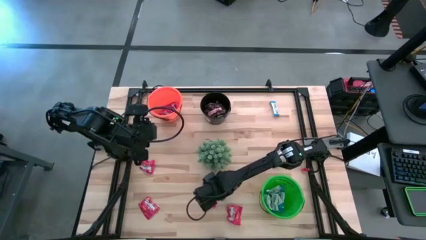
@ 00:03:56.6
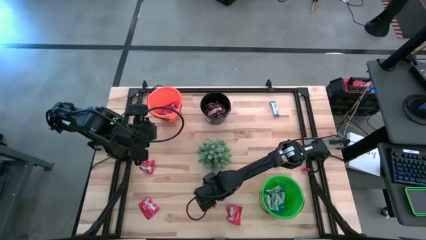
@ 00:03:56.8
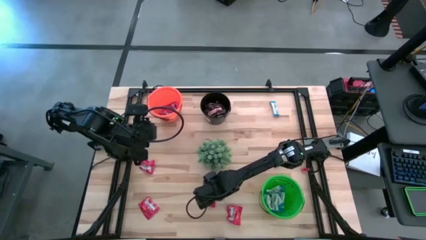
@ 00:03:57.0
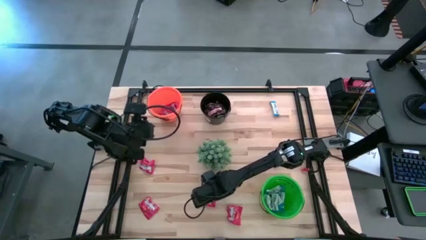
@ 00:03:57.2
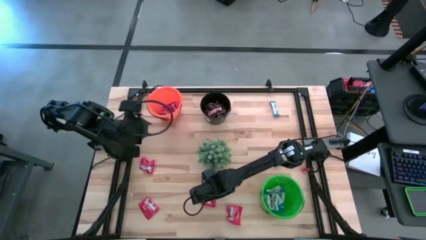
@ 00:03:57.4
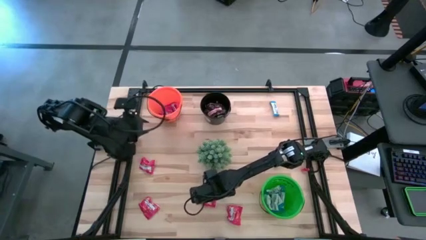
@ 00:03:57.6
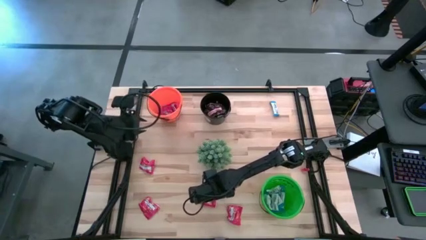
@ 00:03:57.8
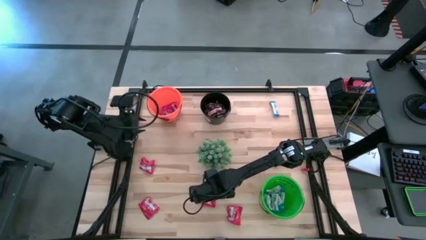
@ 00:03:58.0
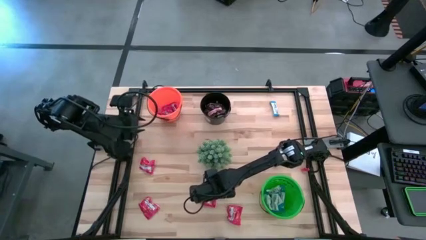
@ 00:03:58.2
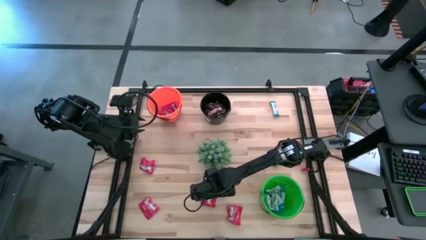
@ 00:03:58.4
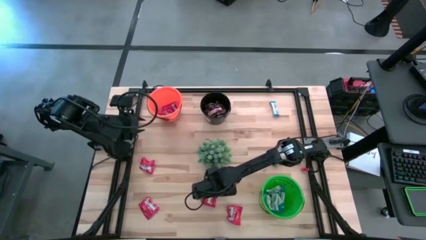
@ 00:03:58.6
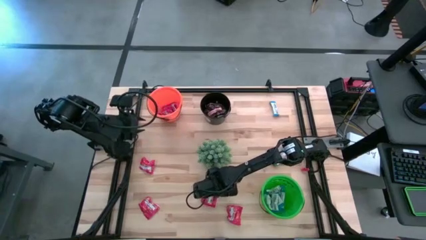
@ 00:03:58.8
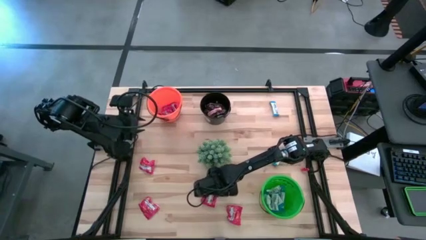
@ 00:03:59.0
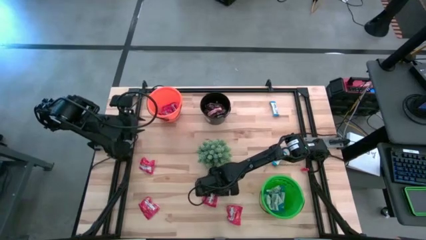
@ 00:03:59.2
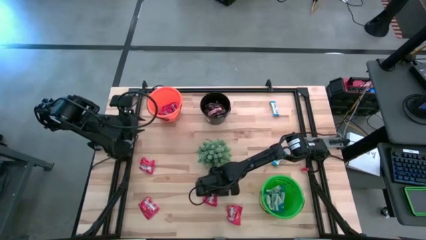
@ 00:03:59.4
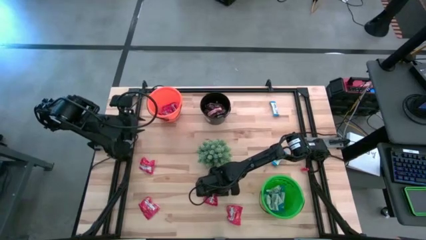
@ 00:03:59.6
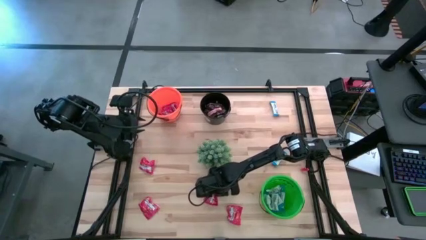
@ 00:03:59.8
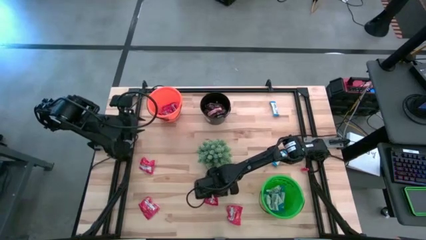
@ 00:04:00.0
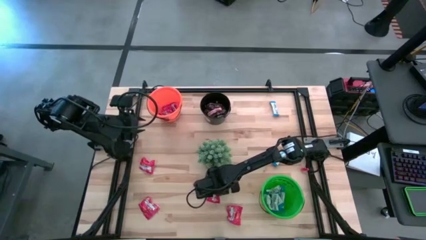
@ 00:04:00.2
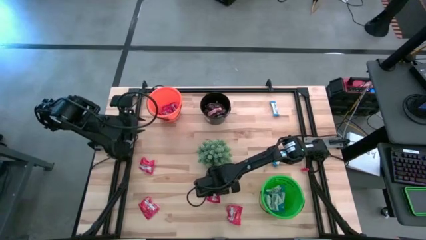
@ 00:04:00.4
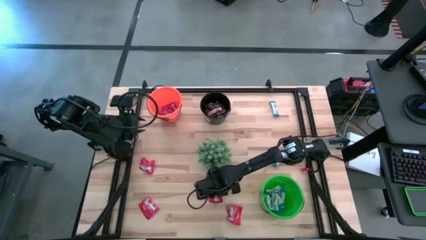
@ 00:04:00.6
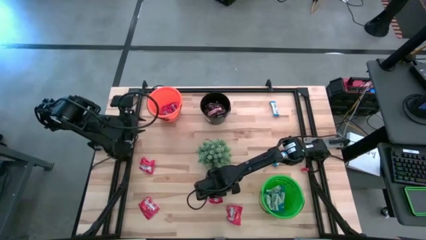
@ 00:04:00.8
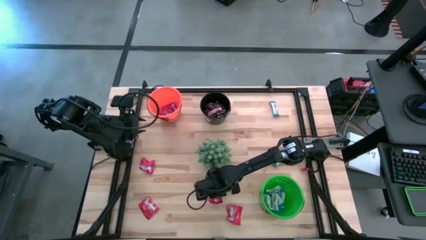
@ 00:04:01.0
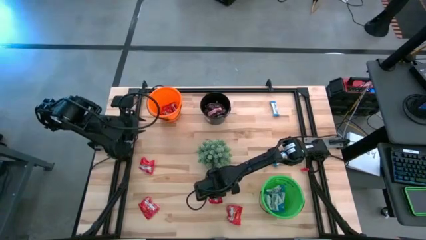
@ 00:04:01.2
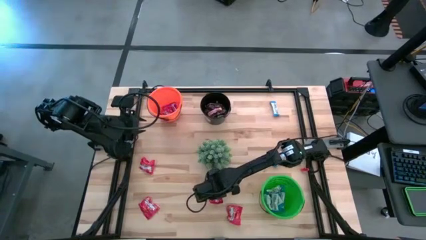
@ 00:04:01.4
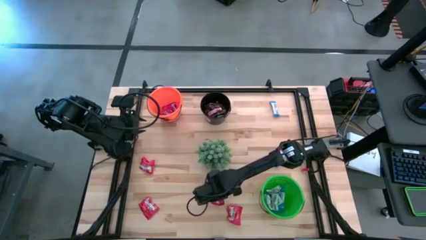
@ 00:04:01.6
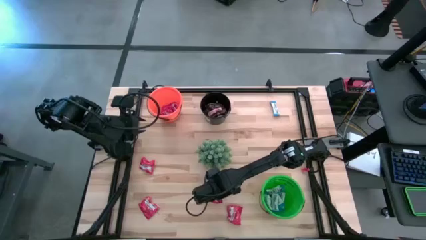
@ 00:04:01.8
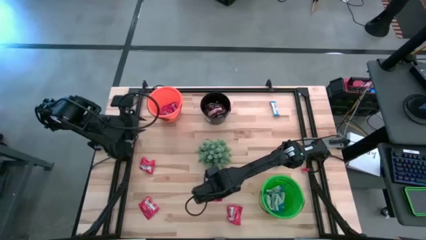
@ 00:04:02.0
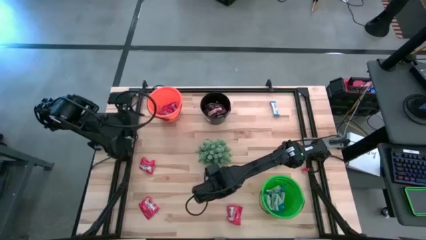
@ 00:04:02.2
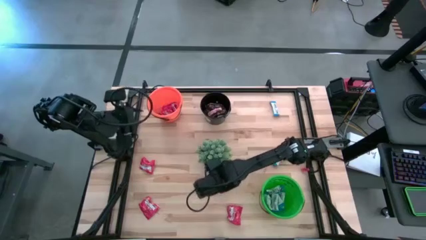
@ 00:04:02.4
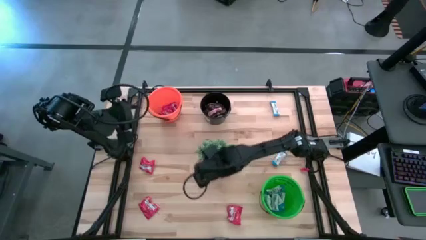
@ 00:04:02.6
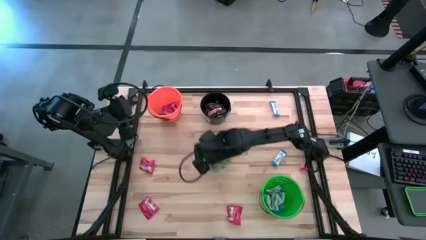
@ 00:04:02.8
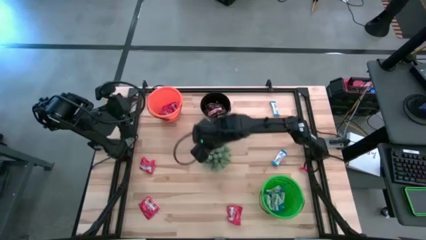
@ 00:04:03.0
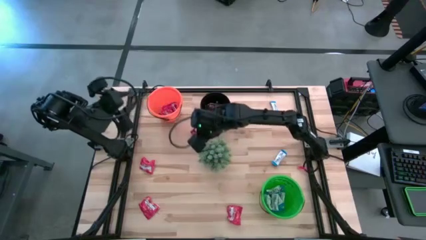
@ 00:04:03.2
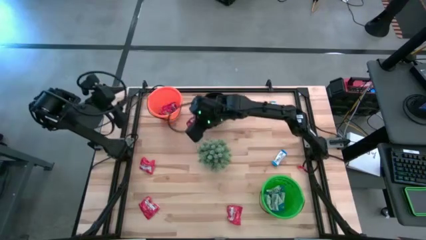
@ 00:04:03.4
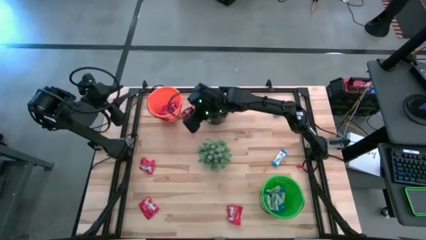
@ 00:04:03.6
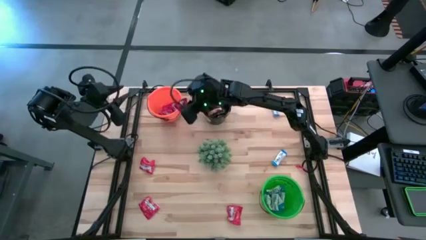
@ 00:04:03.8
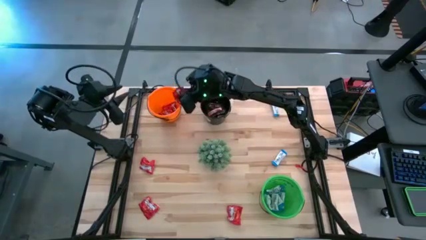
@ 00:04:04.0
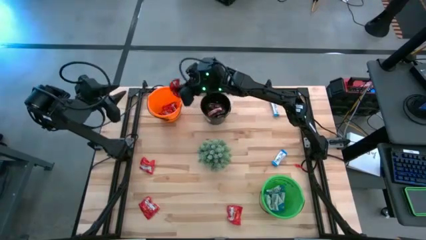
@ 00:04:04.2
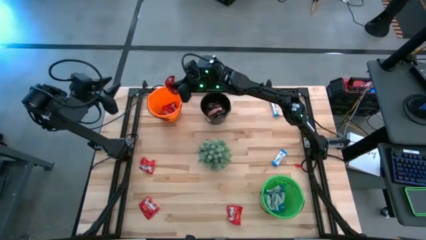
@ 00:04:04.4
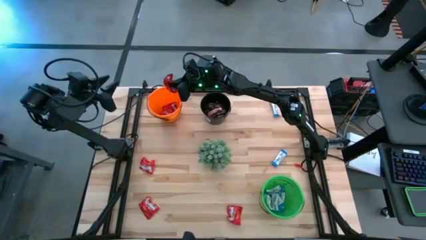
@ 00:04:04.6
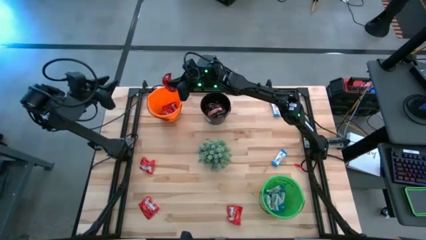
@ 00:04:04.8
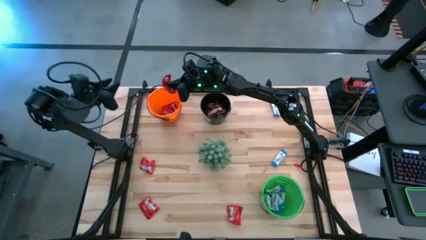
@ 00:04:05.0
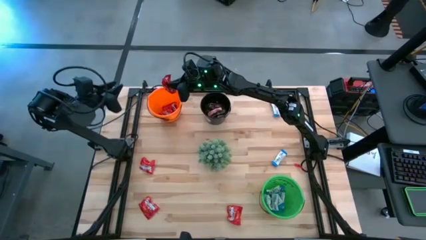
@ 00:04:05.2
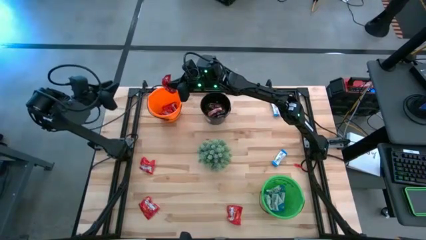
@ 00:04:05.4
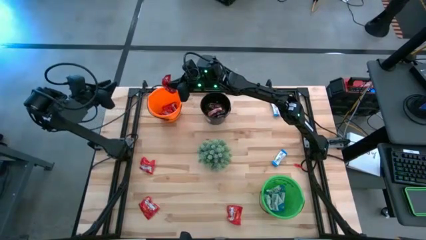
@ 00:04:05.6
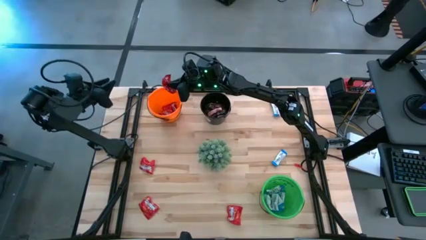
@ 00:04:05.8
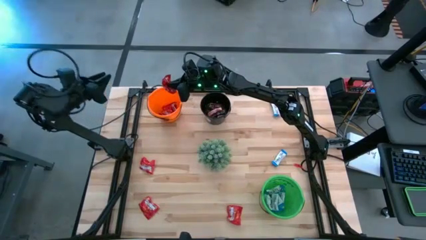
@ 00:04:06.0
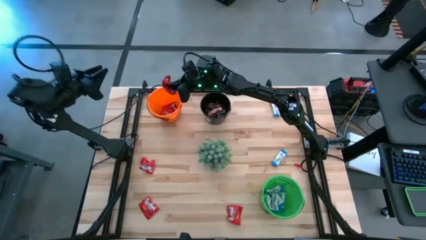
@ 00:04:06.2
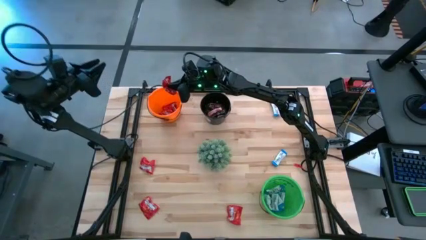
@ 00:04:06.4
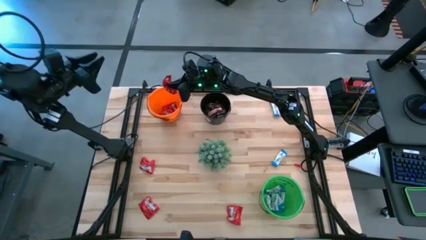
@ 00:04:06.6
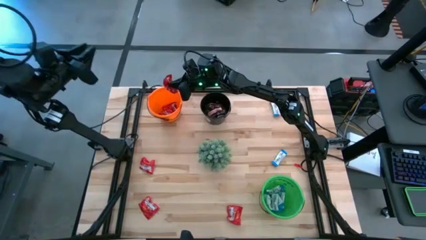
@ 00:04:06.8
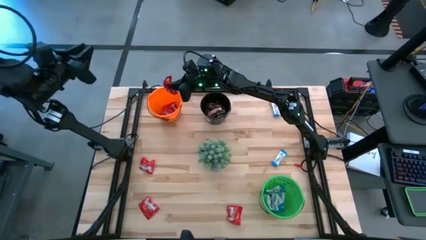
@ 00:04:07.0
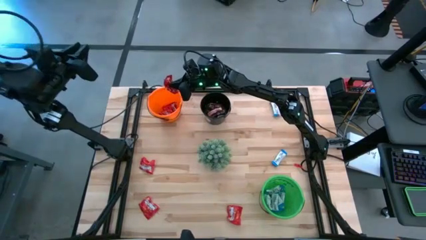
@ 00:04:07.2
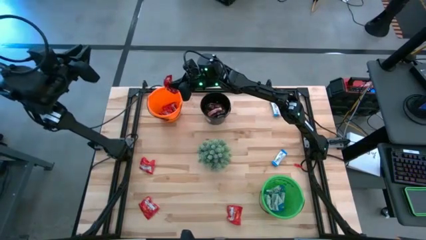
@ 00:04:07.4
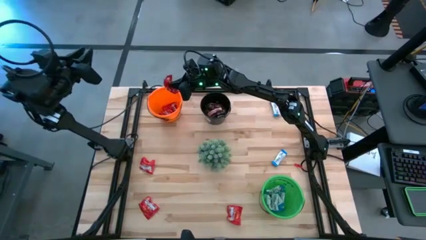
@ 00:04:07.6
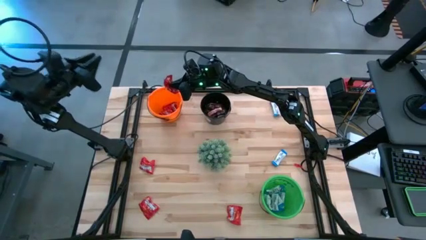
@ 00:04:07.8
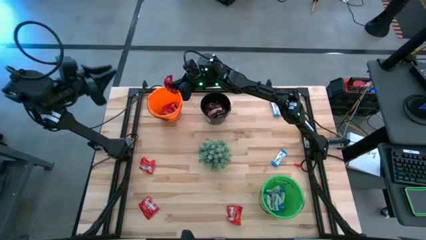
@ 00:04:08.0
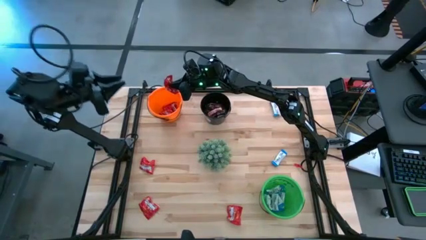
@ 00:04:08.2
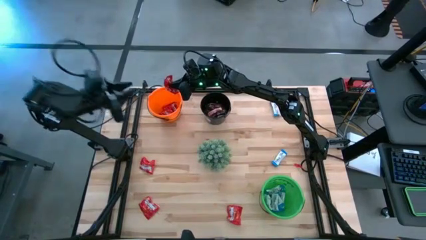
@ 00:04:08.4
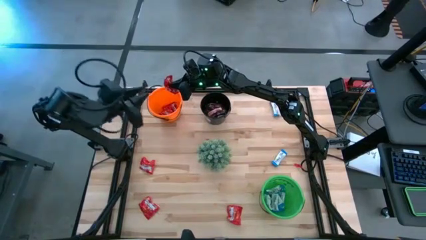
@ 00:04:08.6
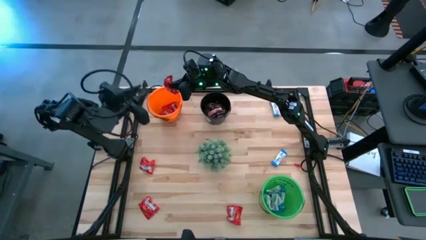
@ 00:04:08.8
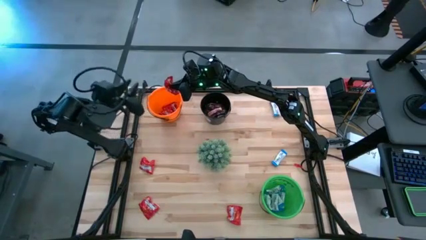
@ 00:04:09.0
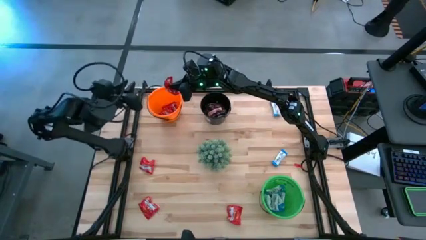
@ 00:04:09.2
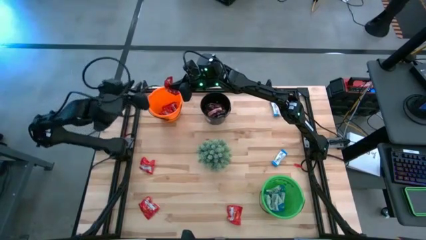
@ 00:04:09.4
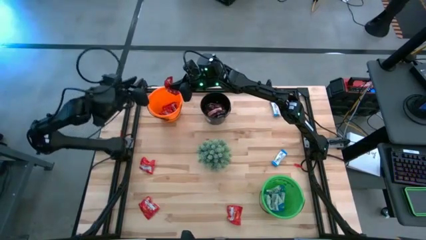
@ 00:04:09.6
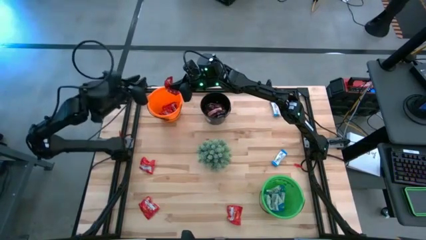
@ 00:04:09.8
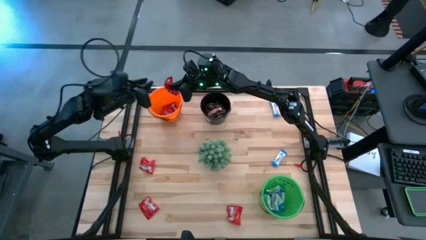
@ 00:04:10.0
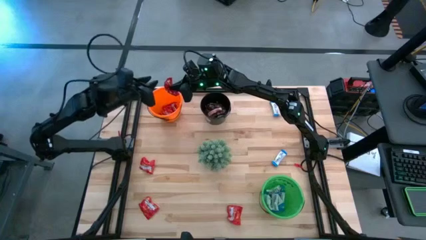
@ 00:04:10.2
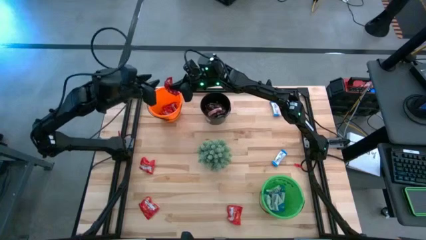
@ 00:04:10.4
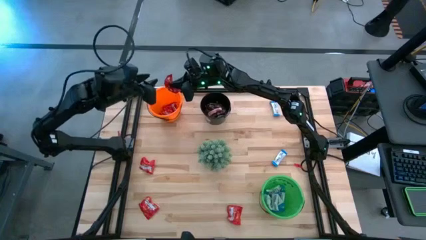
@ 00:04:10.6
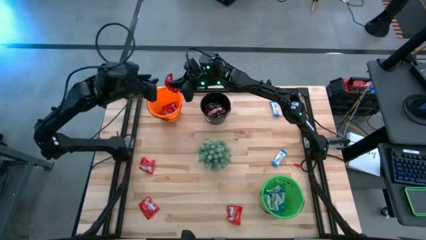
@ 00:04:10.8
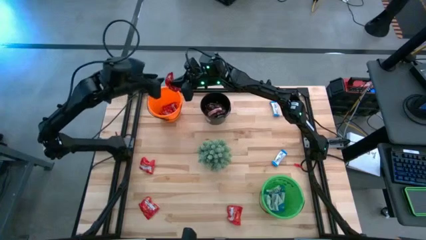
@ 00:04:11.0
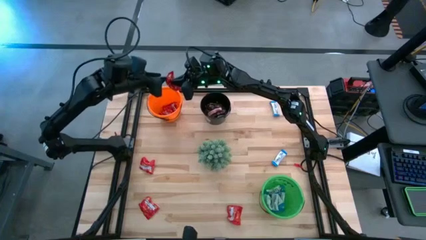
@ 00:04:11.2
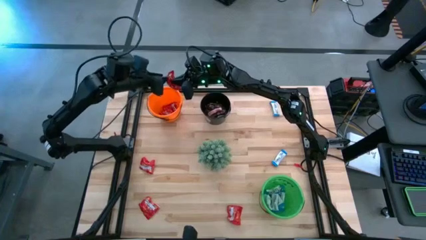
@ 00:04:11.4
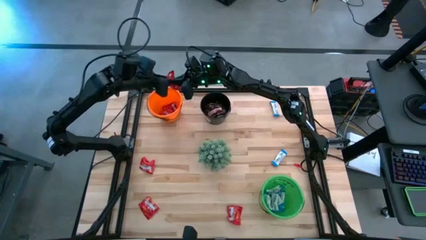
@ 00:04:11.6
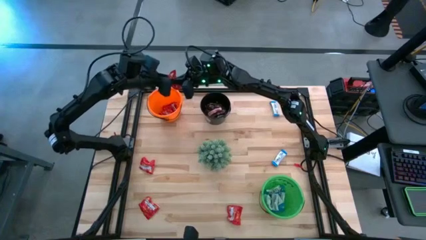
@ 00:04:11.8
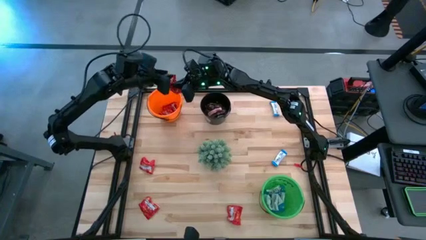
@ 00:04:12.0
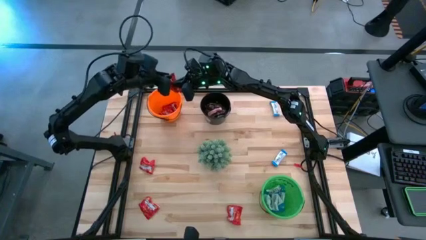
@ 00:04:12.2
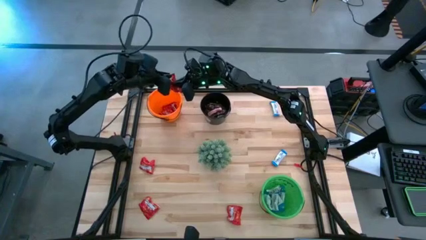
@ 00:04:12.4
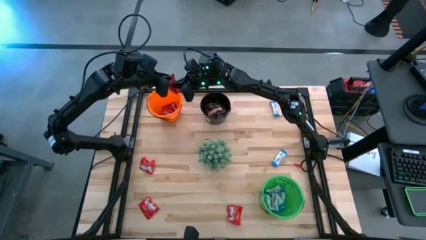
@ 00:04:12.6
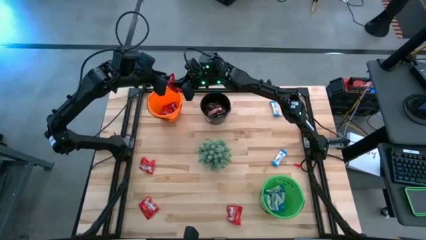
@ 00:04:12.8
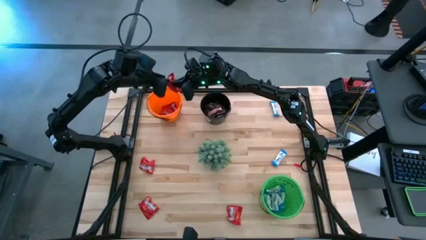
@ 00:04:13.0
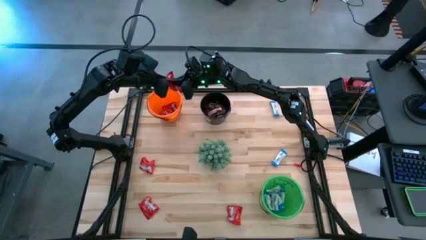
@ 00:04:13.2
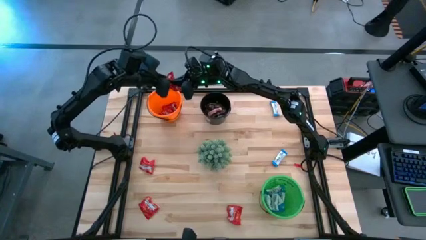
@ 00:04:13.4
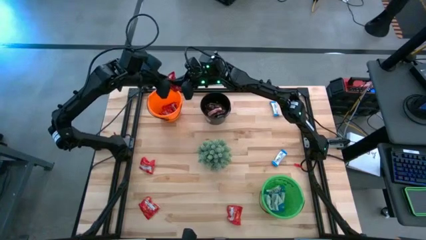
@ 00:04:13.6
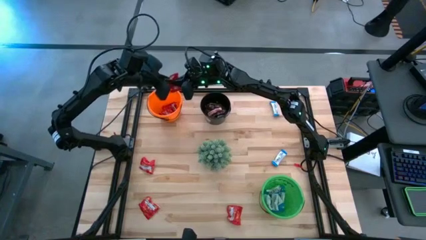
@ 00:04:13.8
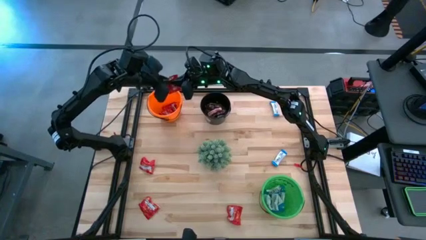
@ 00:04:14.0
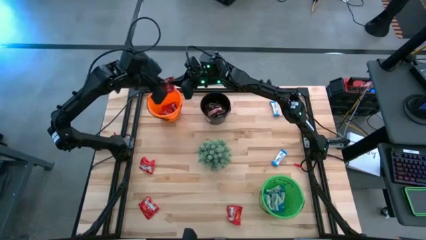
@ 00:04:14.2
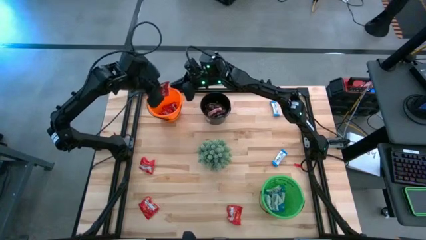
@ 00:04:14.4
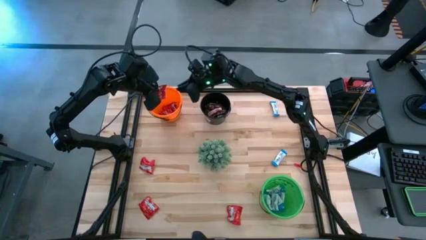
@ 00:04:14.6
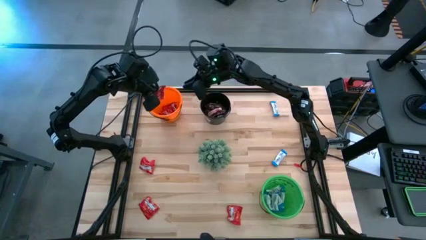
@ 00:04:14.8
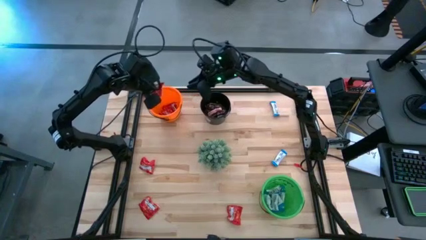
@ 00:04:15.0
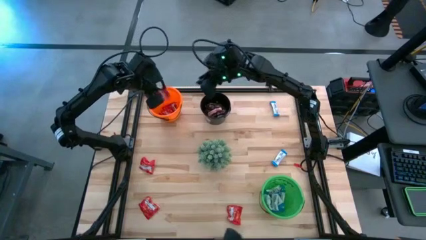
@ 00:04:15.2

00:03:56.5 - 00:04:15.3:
Task: Sort candy
Put the red candy into the orange bucket
